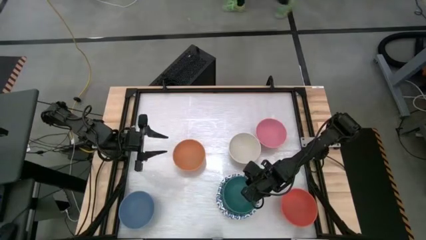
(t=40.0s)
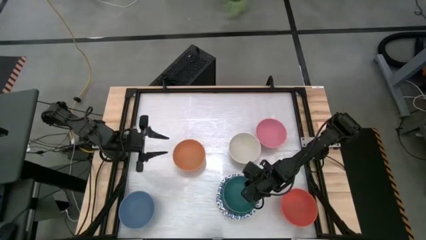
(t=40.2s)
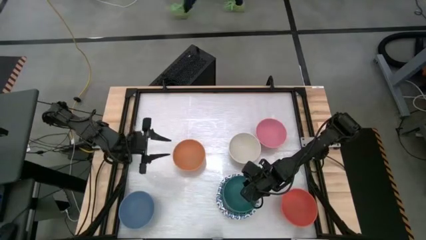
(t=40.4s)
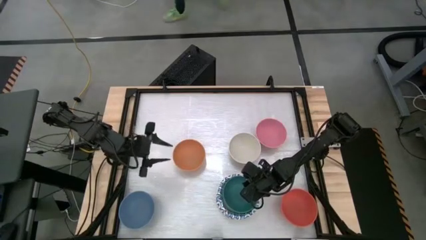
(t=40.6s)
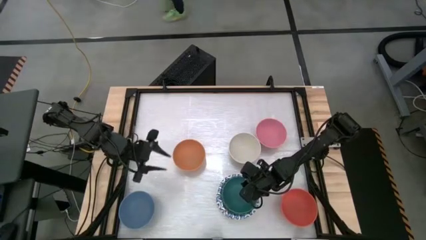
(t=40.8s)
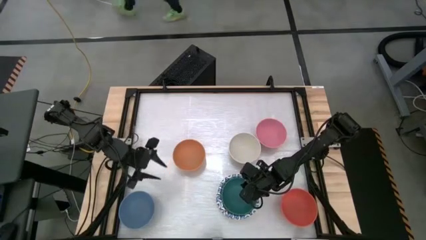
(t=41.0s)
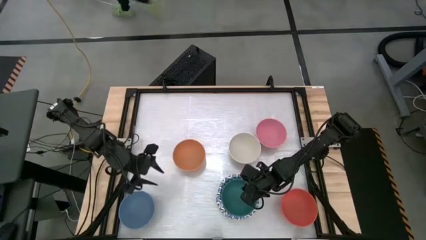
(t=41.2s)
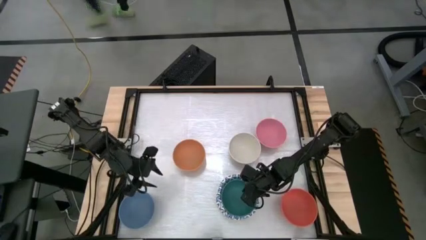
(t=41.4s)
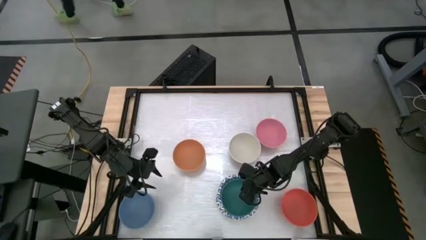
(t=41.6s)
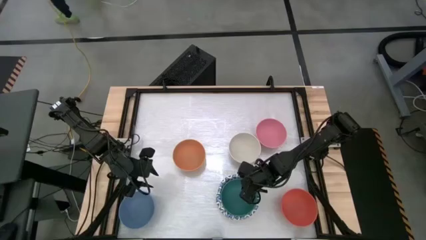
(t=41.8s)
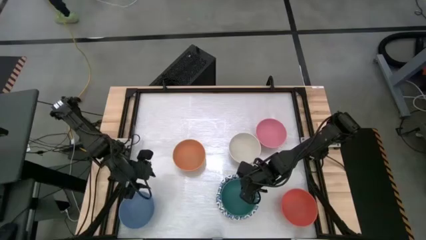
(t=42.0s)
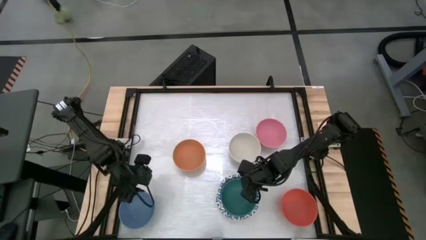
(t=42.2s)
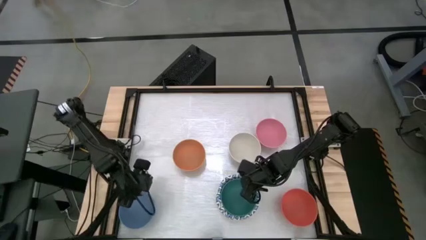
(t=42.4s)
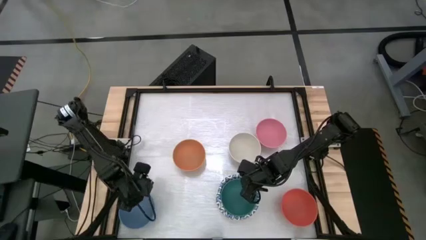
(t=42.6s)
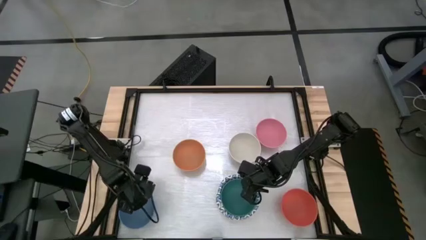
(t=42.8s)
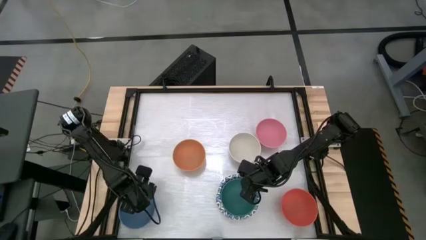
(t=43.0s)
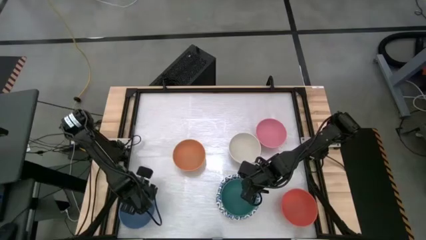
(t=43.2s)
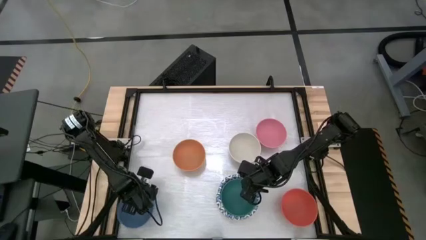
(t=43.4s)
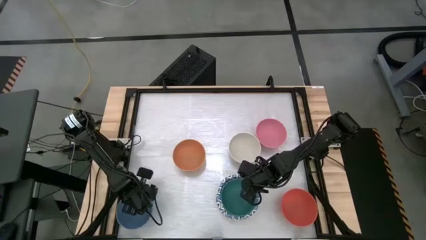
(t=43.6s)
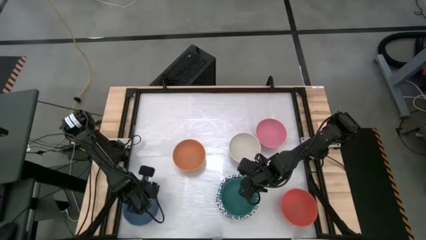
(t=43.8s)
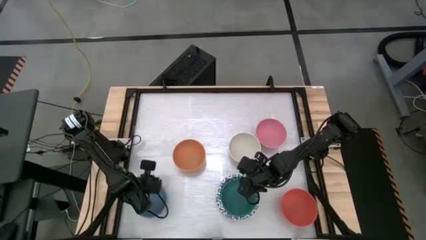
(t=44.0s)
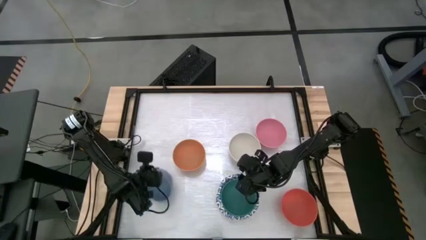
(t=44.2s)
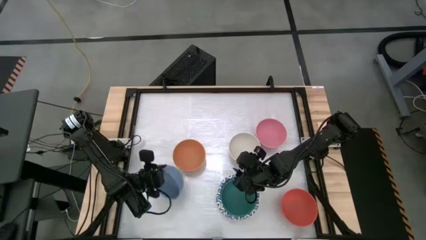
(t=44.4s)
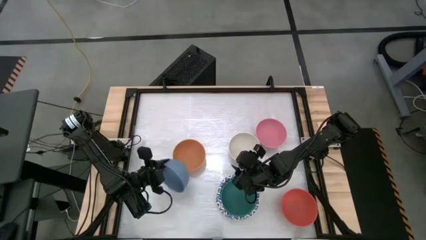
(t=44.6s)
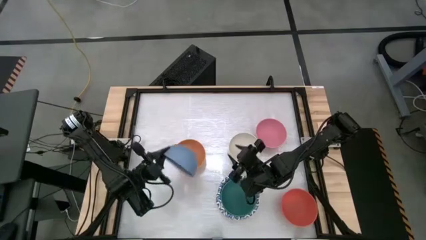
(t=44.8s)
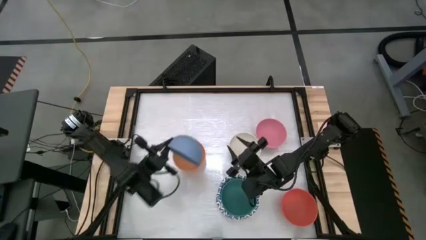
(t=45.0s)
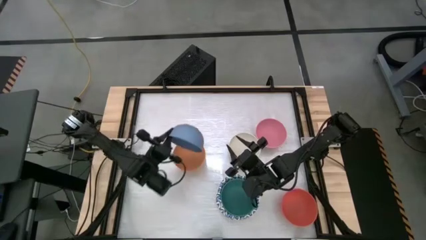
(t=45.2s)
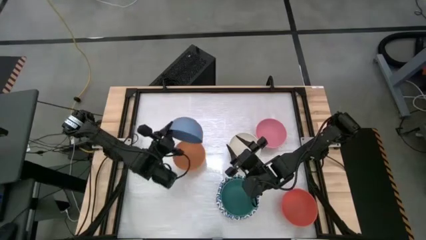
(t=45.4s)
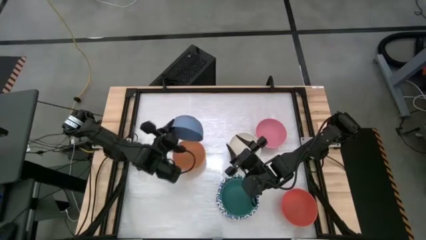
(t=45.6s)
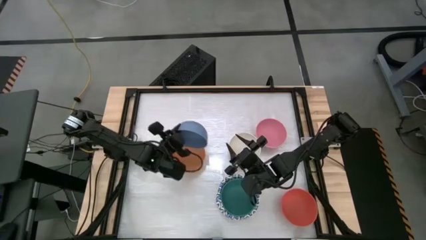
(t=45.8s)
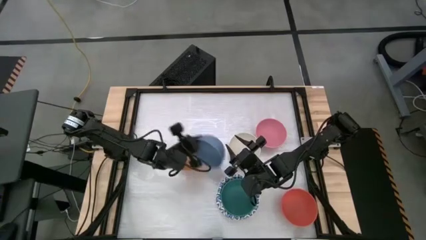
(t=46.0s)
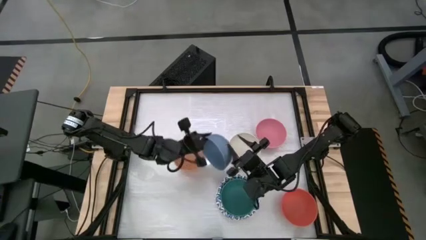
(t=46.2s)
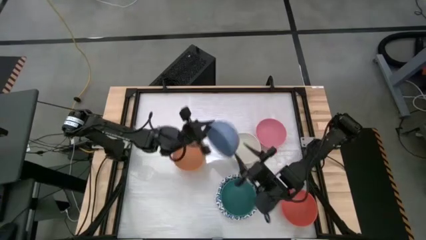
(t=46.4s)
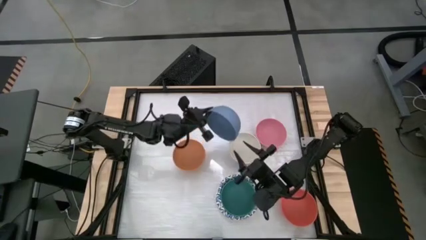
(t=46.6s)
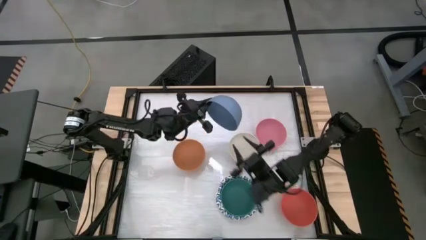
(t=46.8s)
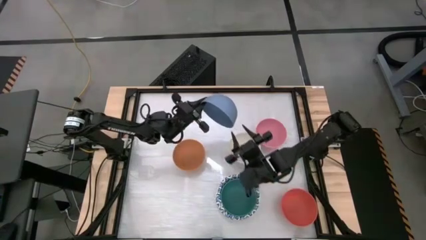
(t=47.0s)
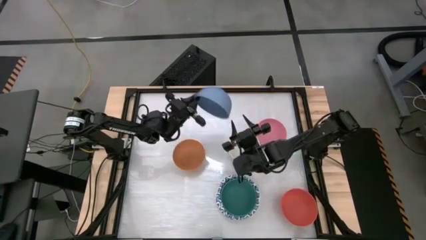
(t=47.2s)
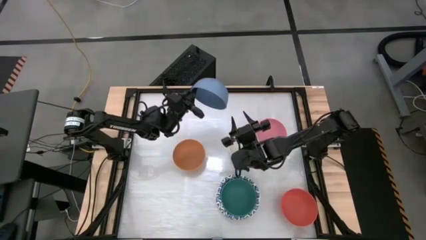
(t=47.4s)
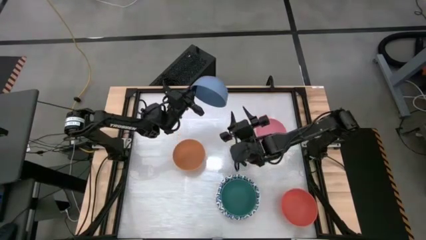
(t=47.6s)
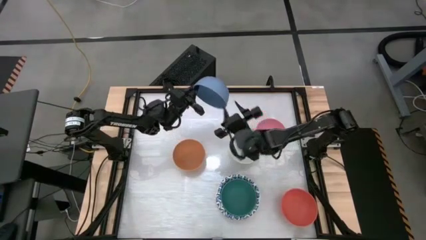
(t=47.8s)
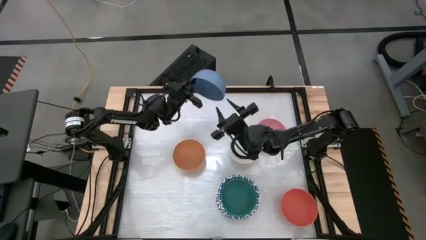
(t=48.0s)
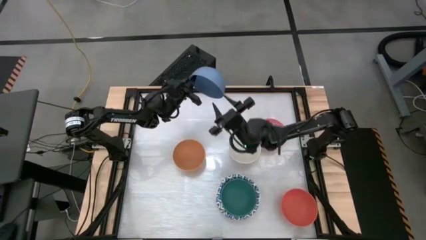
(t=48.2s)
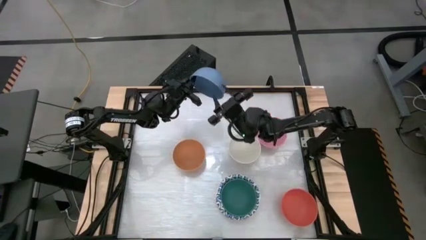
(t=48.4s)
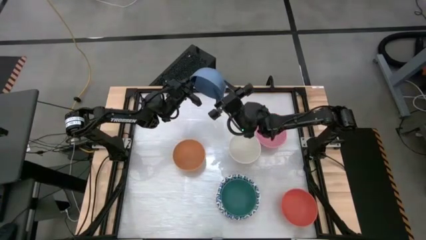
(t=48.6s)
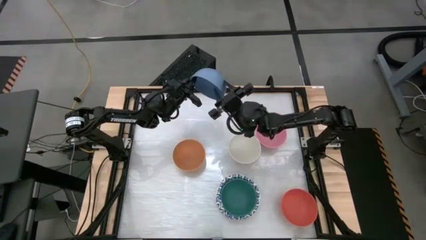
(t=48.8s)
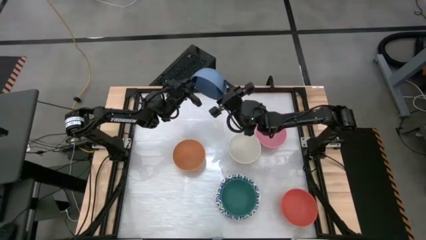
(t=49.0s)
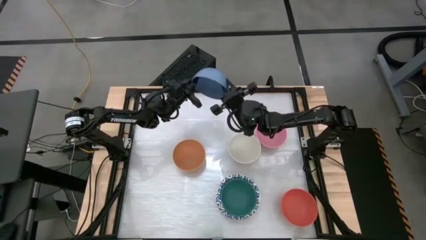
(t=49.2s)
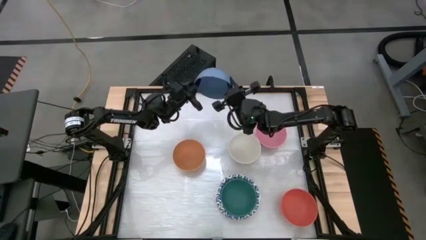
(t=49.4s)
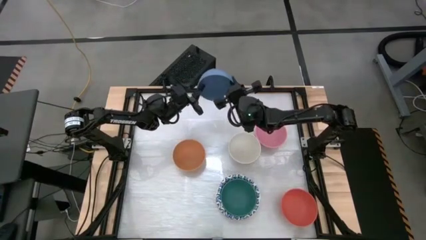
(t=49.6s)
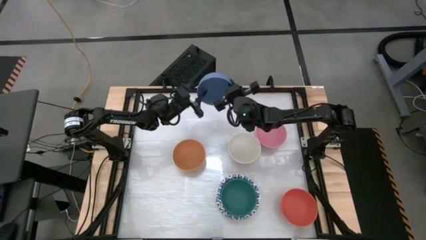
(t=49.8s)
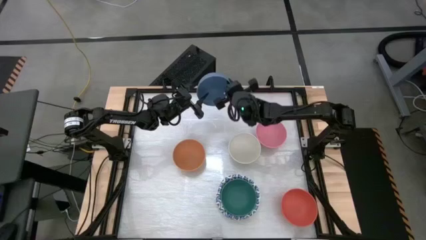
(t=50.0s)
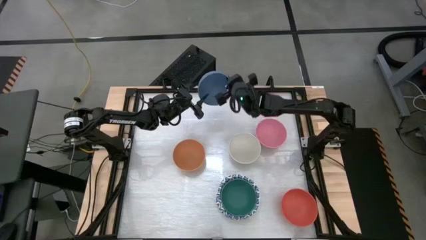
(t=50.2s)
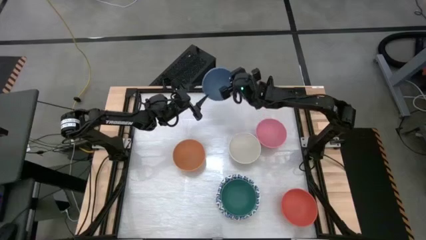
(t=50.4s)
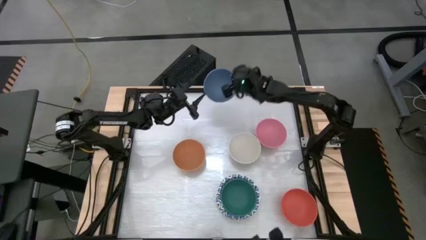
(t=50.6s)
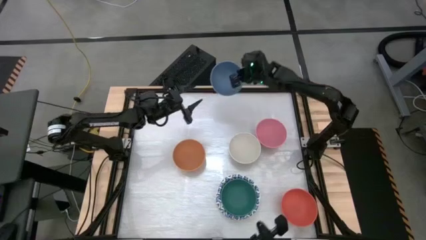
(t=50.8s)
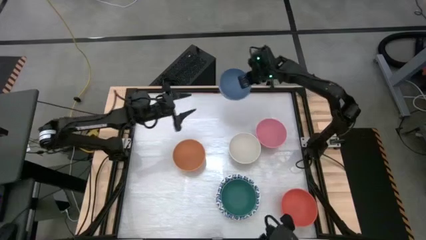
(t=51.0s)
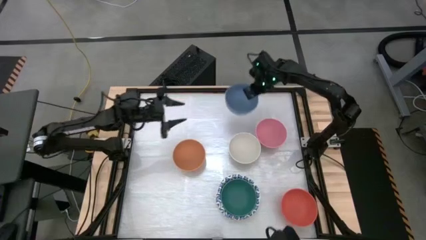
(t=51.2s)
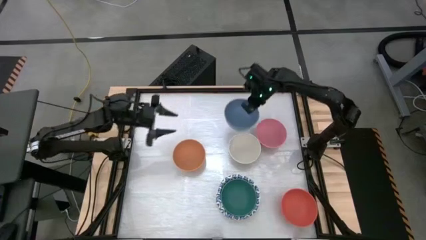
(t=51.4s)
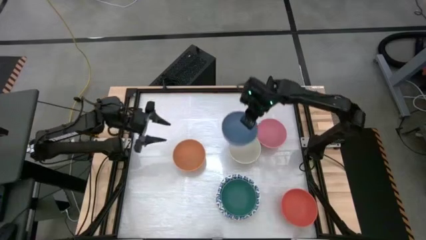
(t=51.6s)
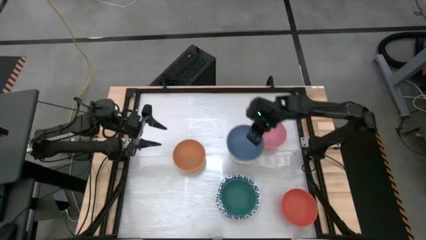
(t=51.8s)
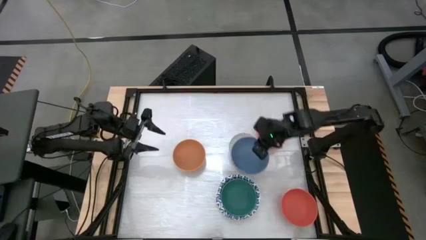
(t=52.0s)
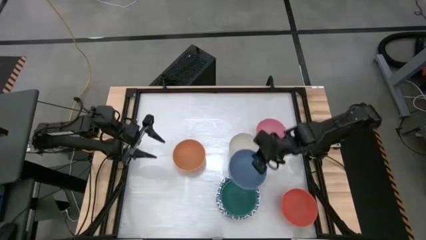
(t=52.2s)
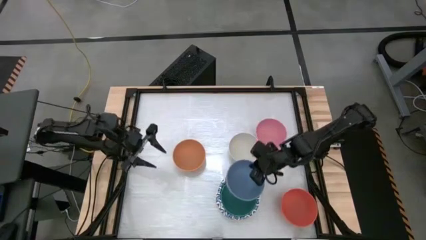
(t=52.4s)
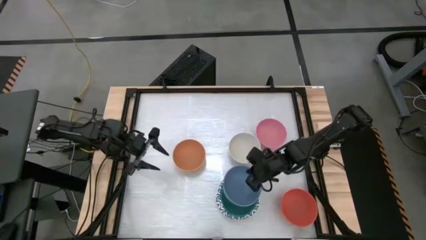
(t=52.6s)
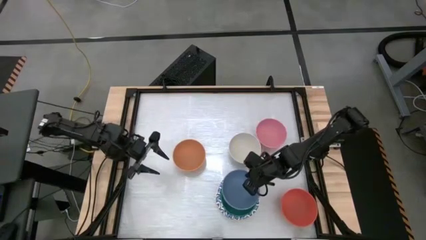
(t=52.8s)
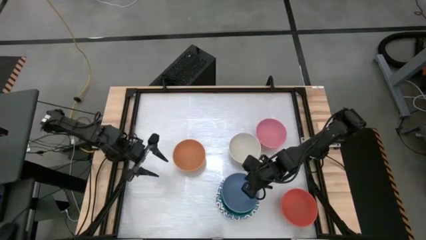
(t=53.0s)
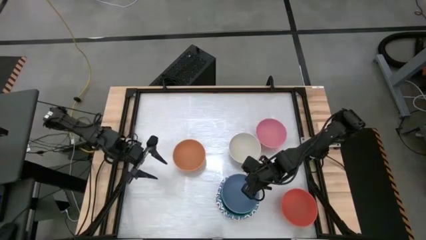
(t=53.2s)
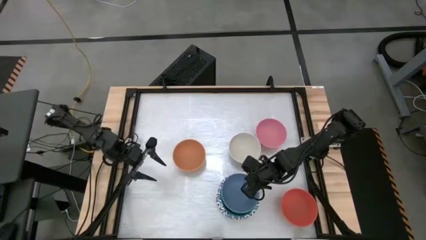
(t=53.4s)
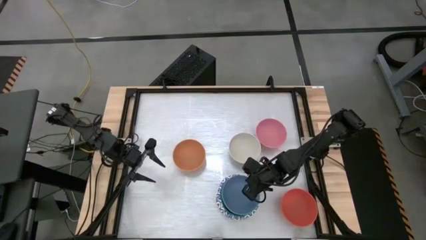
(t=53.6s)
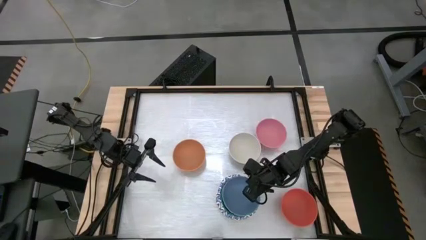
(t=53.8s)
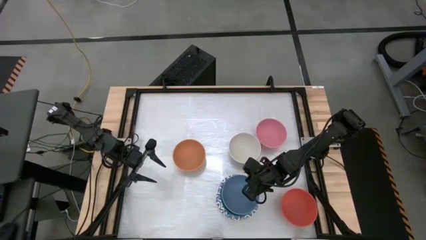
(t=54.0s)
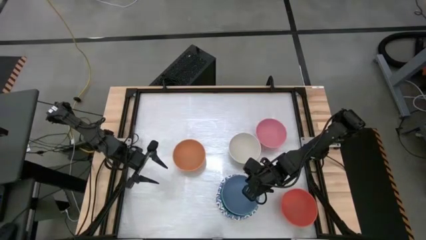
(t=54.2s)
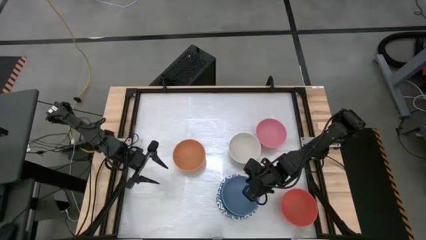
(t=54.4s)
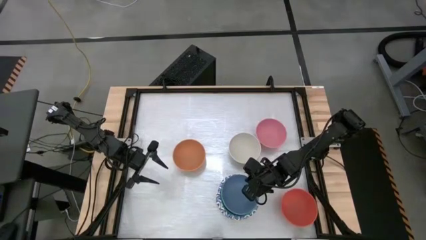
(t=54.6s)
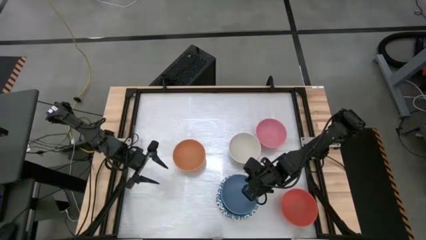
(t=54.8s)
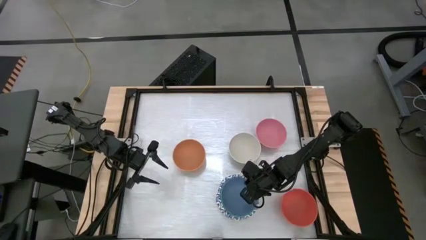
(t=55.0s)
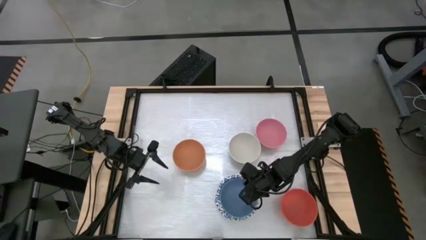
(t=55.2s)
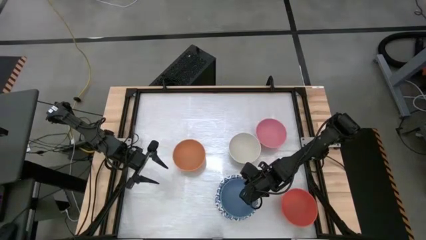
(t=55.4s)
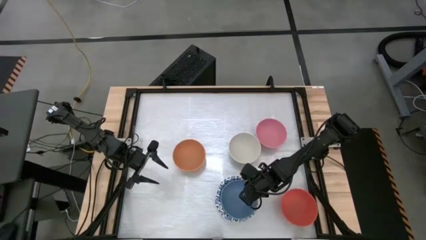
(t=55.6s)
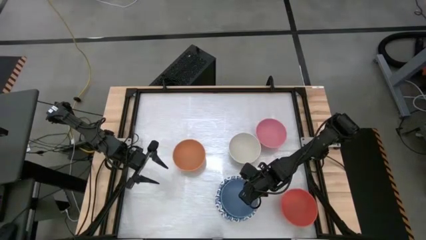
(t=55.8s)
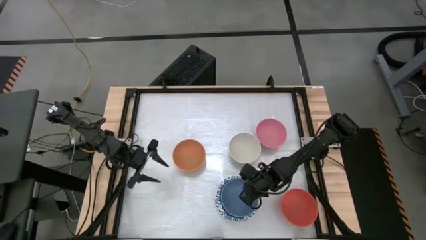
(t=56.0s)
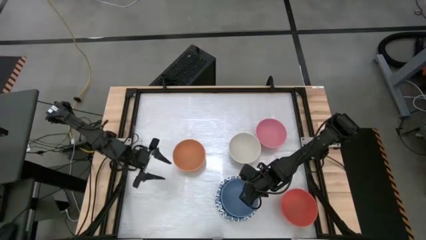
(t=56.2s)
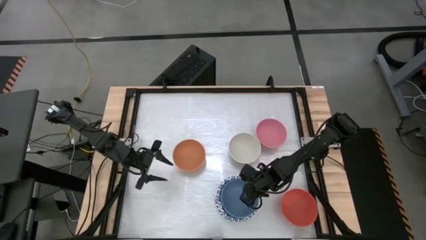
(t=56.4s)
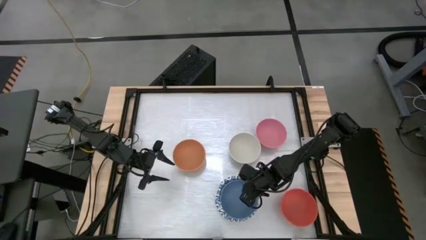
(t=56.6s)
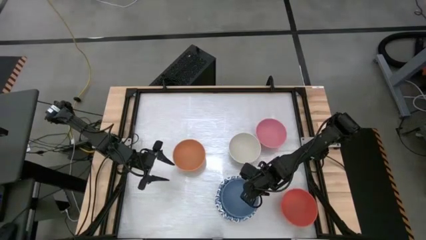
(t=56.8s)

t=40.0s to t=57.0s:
Stack the blue bowl into the green bowl
